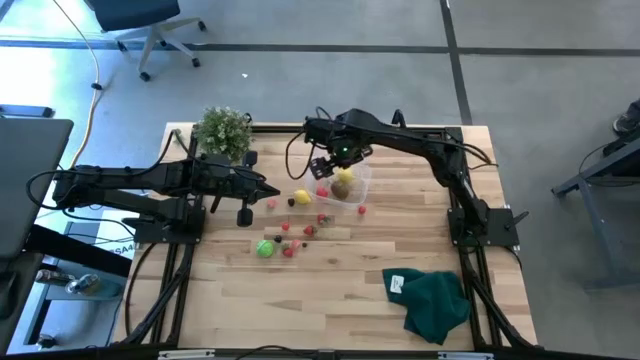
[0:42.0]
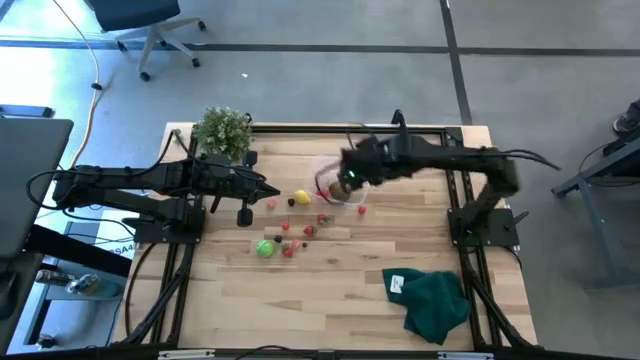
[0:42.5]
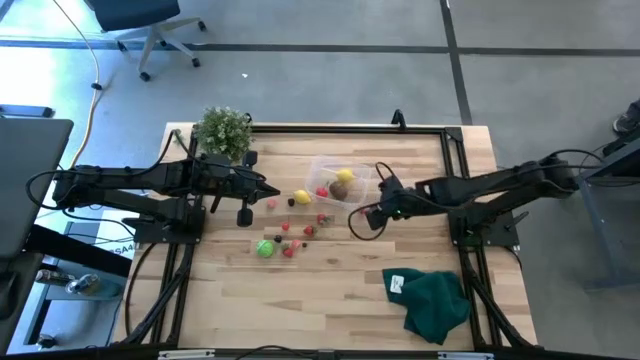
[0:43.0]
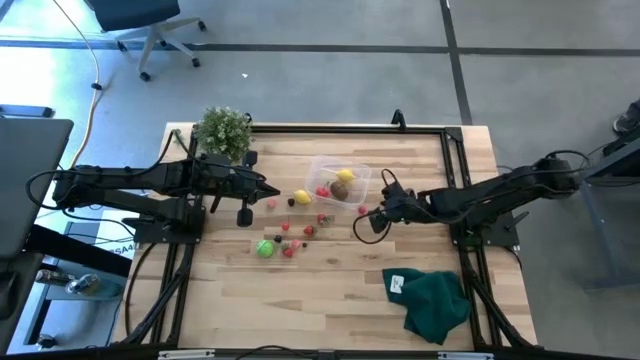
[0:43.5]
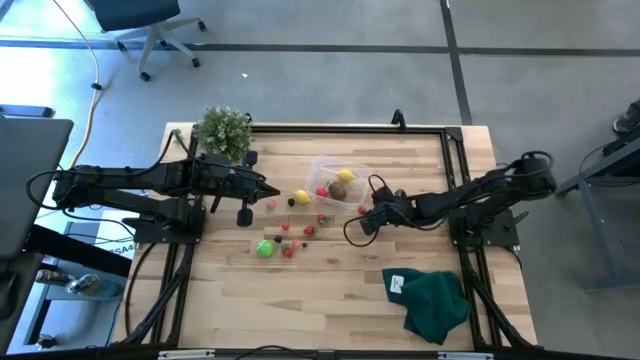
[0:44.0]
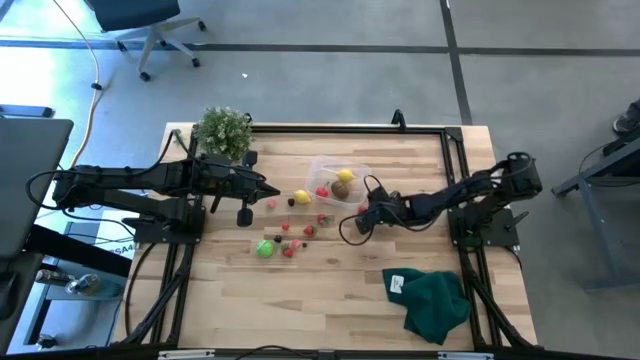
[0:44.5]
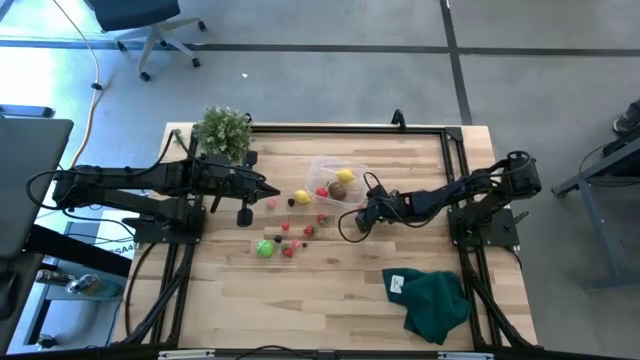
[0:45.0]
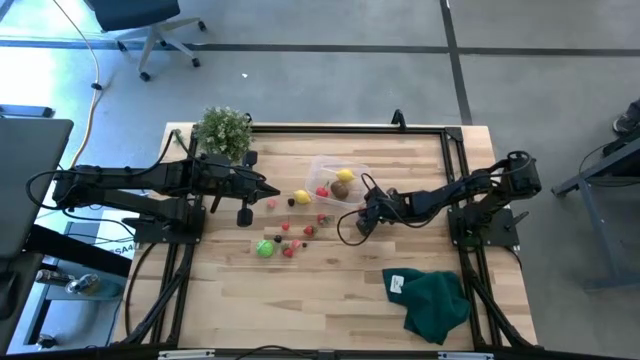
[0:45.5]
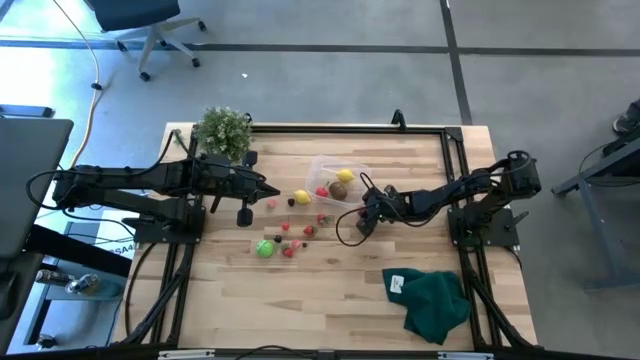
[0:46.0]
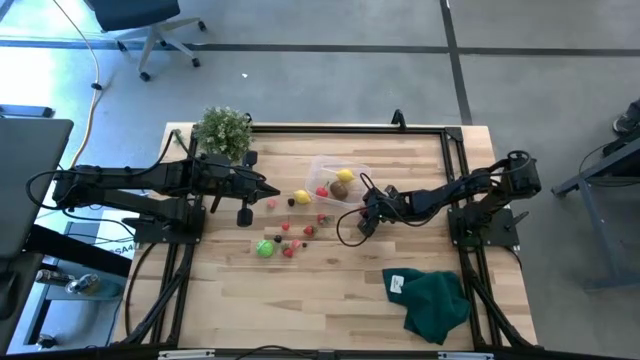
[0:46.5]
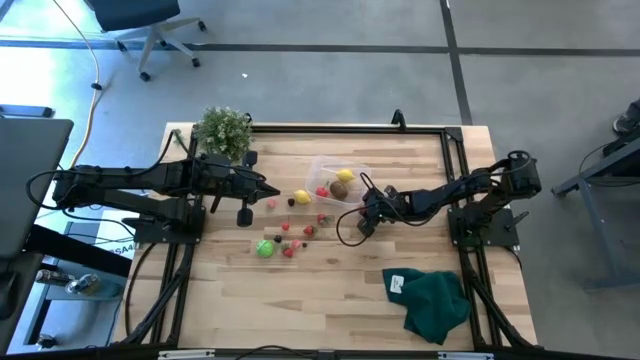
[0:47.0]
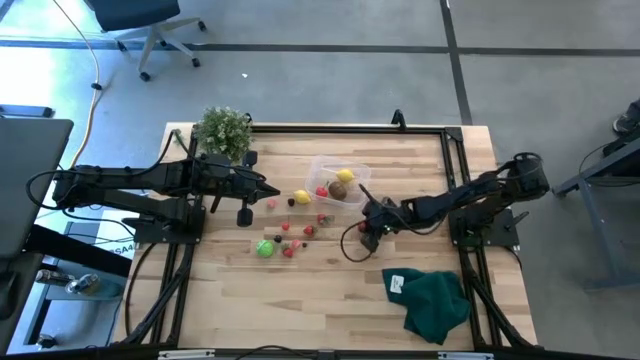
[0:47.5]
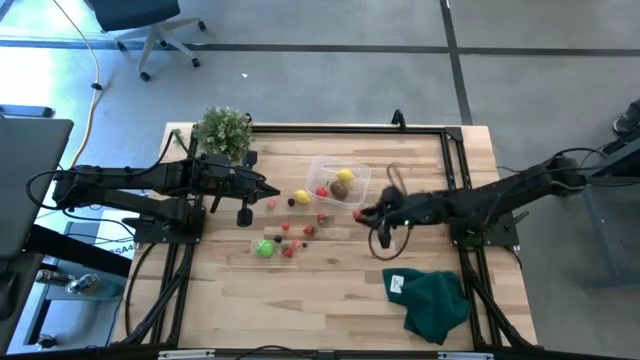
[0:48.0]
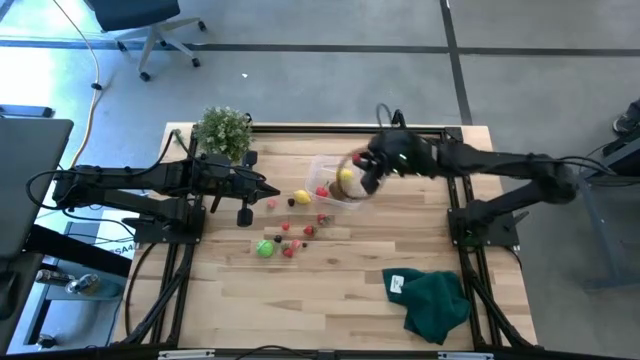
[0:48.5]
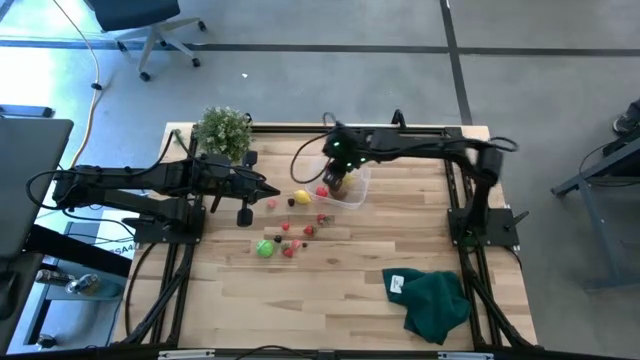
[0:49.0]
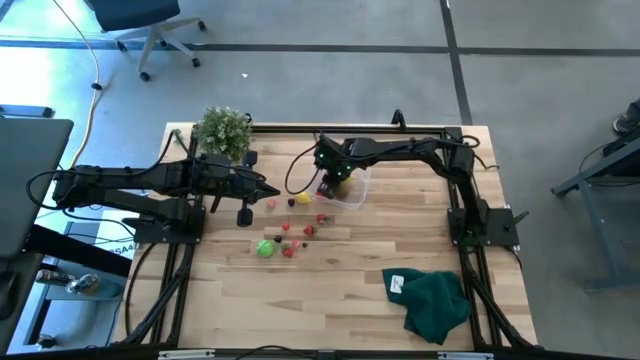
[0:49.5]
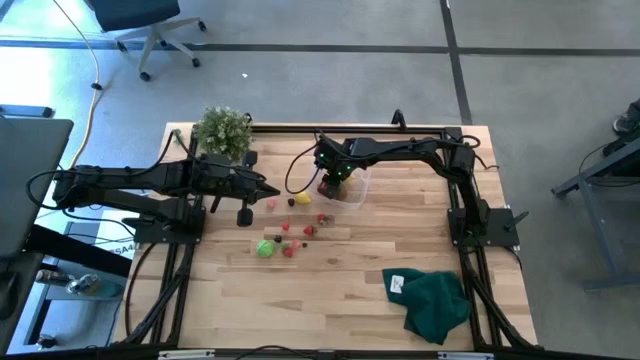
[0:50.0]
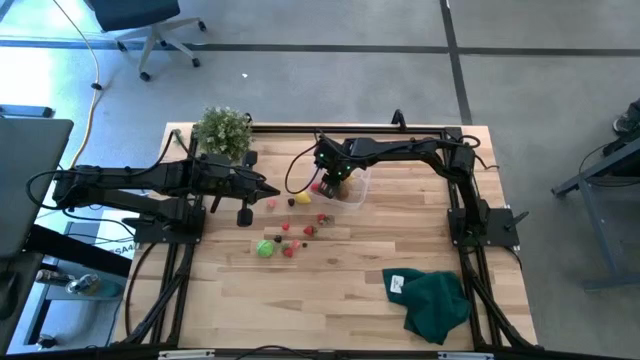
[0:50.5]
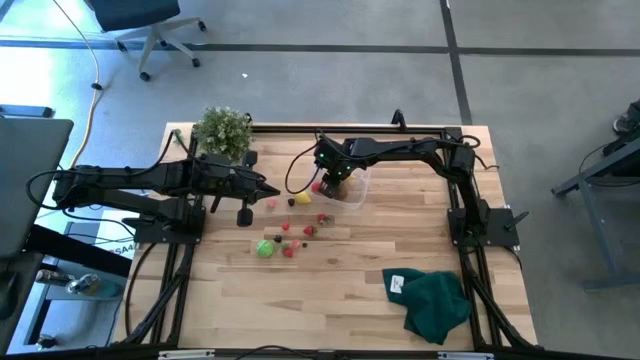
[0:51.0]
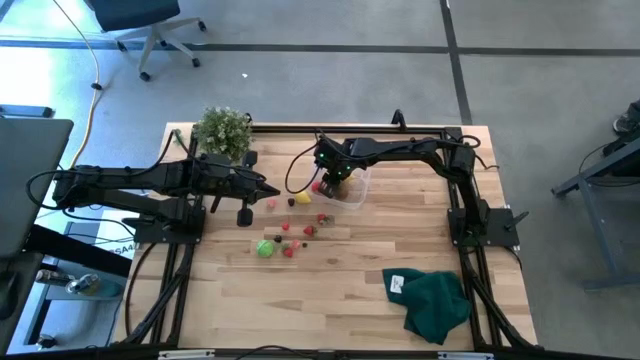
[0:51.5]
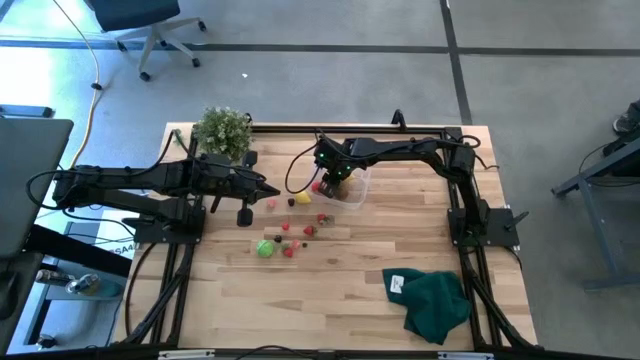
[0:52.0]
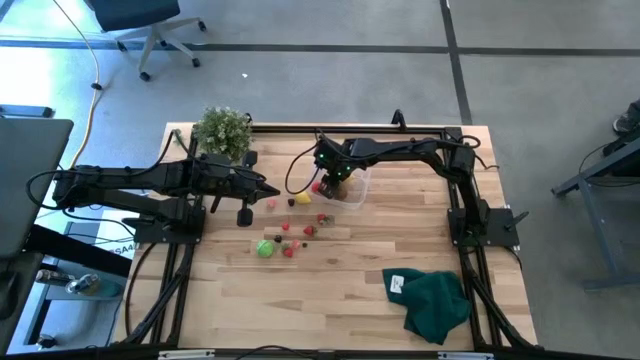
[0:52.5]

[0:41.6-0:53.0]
Task: Pick and placing Produce into tupperware
Put the red cherry into the transparent bin

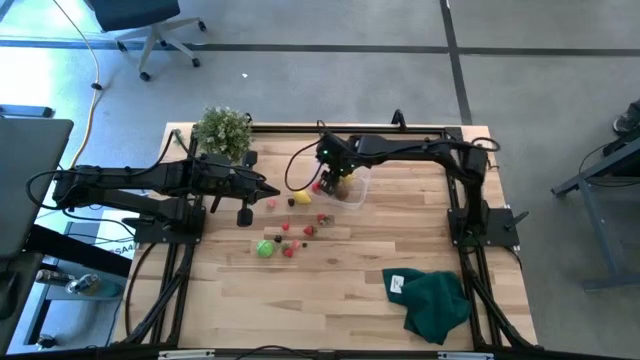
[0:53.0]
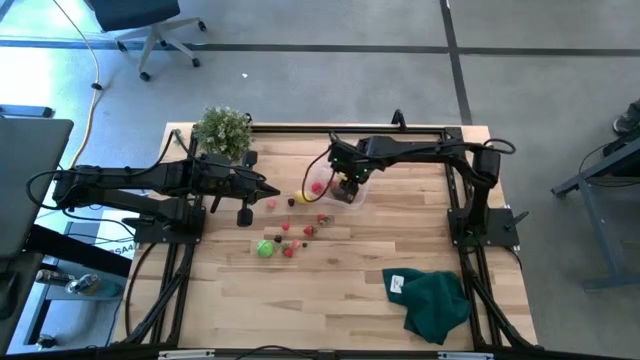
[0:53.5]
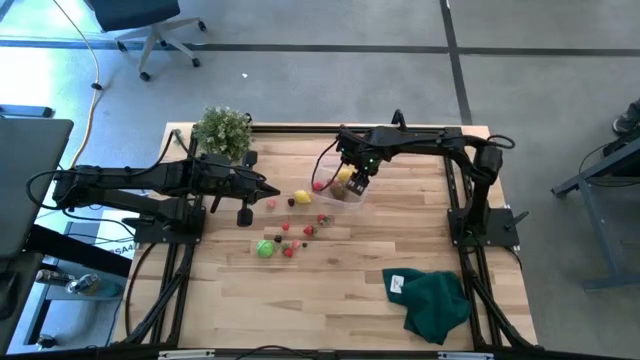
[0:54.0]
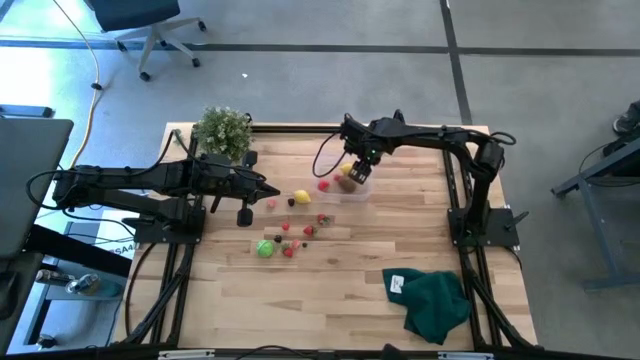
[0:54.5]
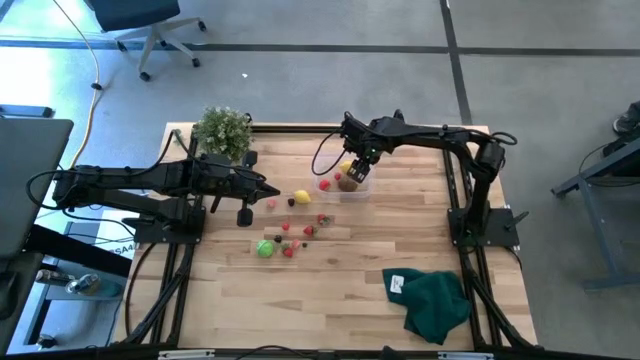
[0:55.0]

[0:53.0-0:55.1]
Adjust the transparent bin

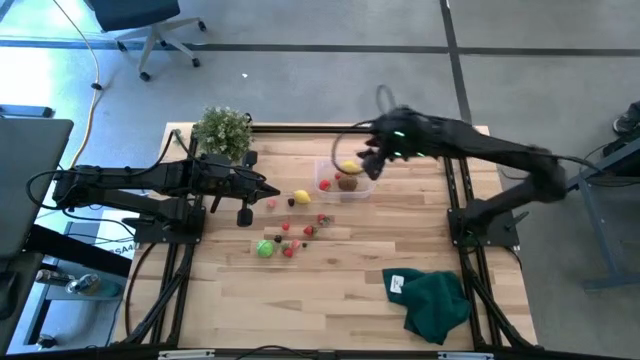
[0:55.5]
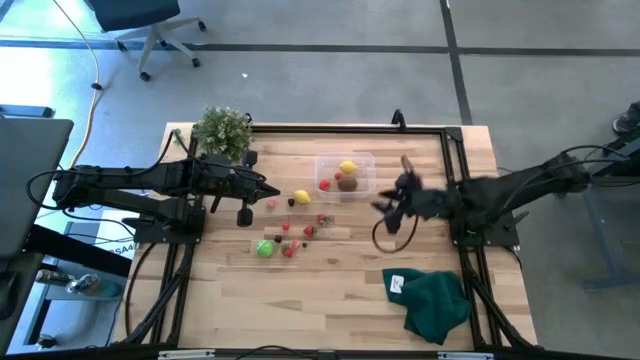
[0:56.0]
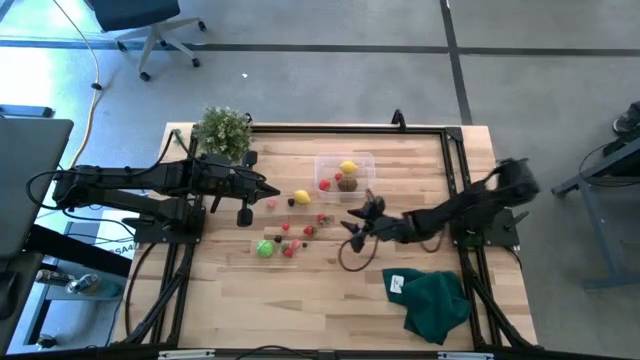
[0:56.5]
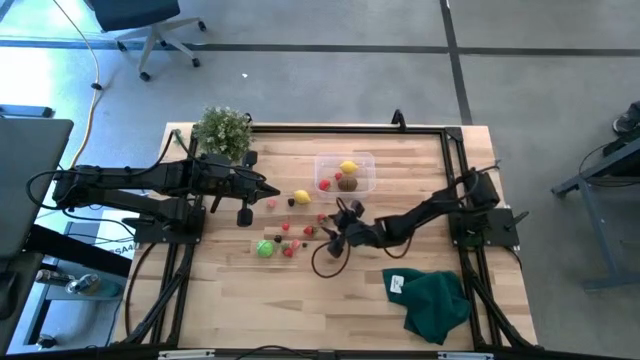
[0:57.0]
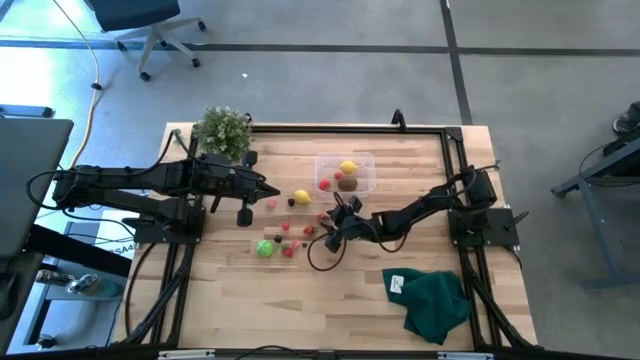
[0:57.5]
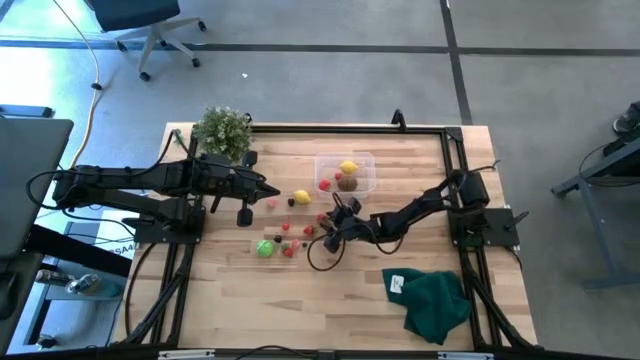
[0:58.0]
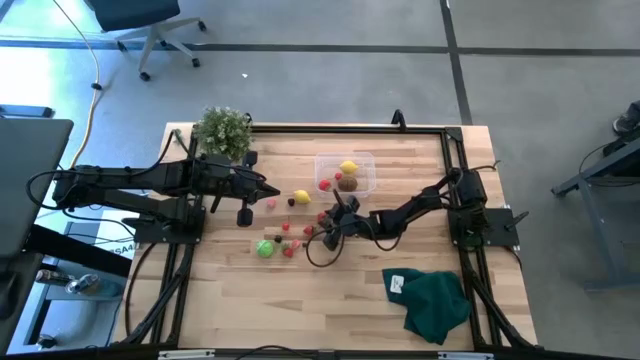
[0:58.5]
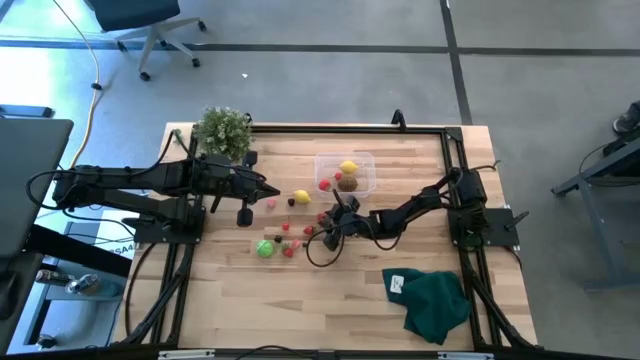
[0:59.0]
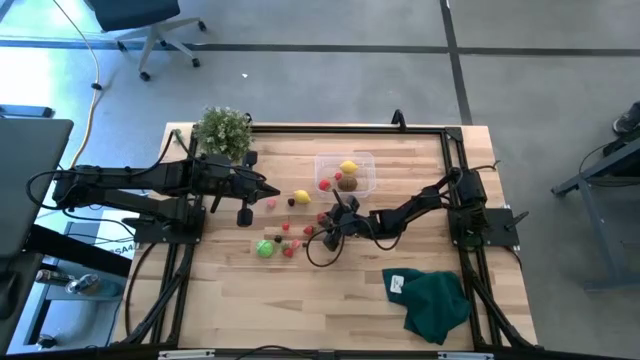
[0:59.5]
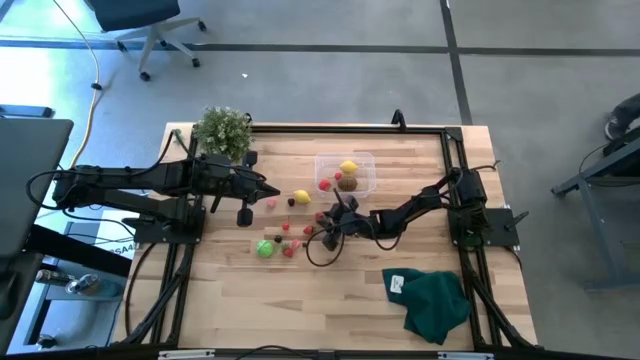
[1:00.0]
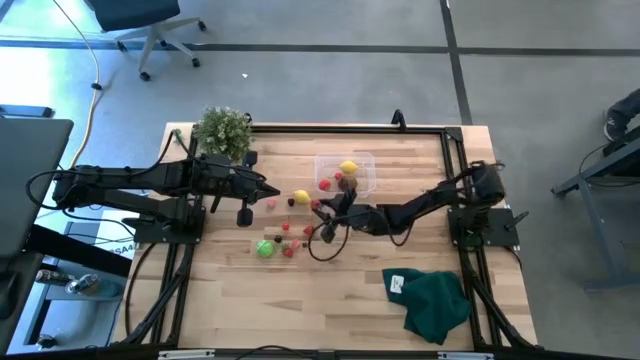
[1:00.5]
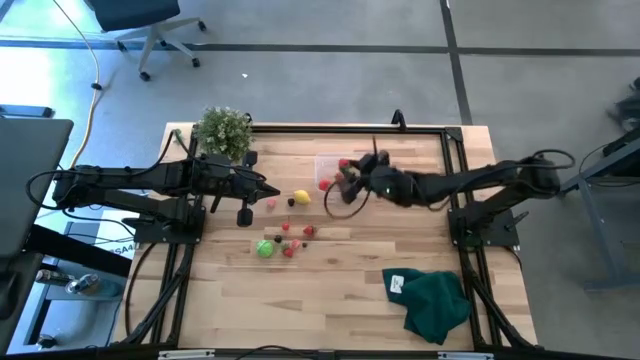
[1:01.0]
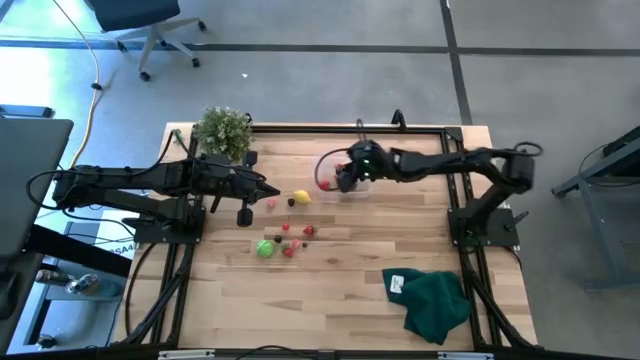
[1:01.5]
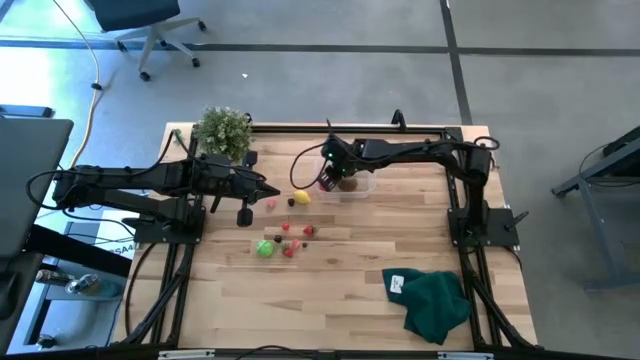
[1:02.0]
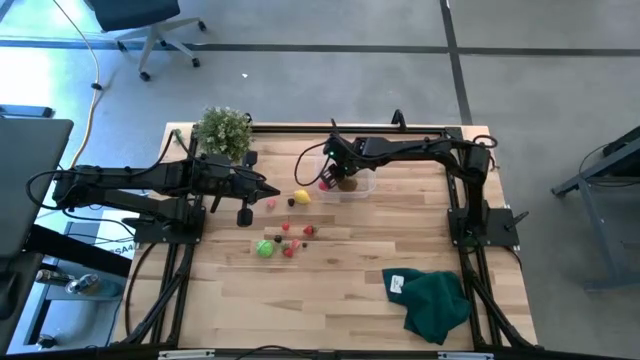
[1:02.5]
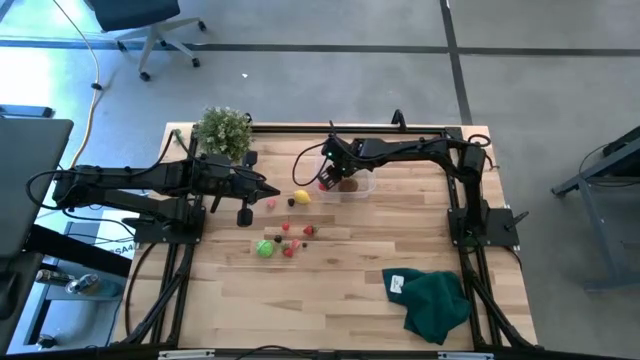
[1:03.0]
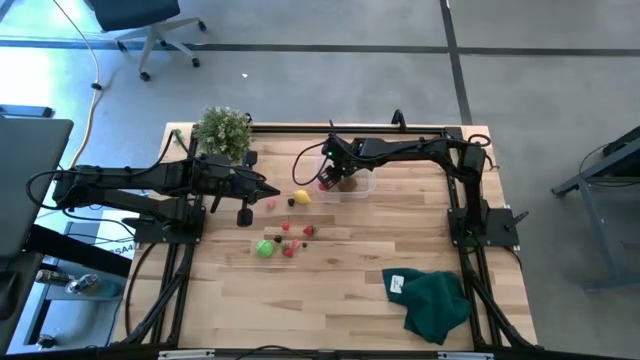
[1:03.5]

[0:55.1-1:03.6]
Put the red strawberry into the transparent bin
